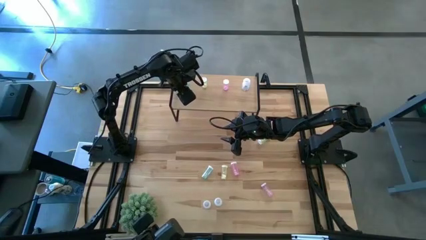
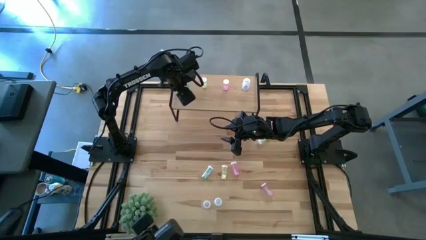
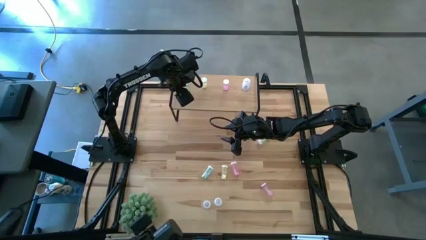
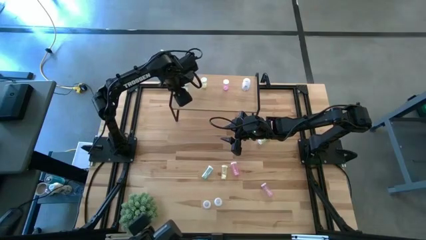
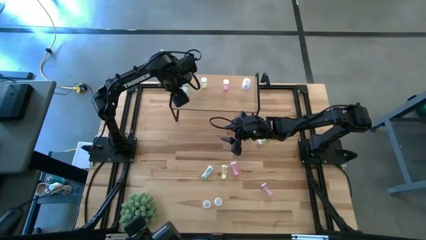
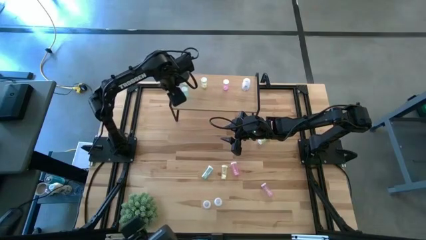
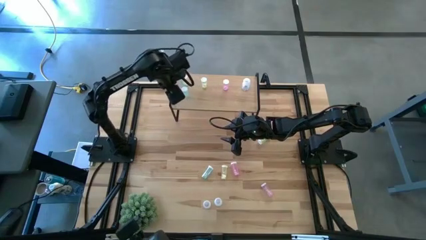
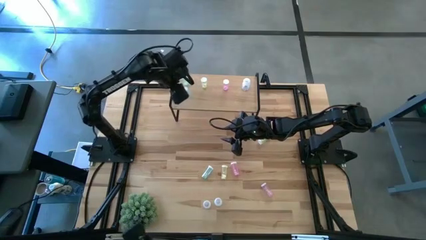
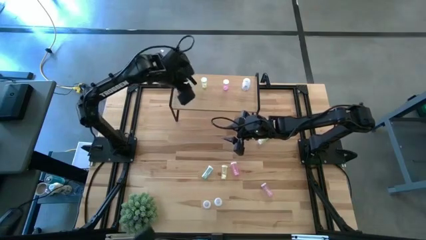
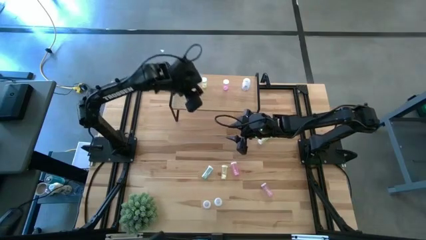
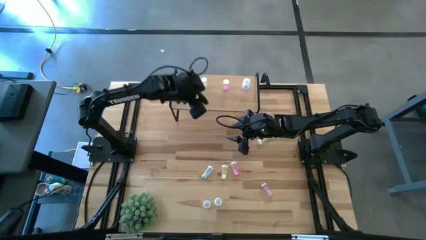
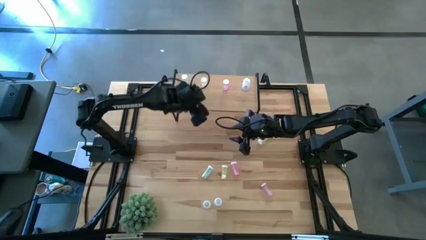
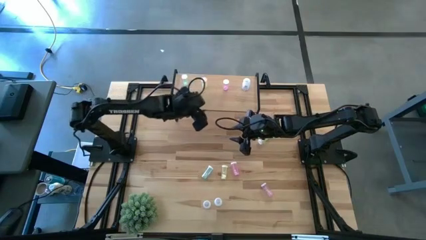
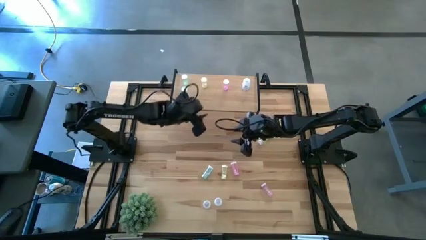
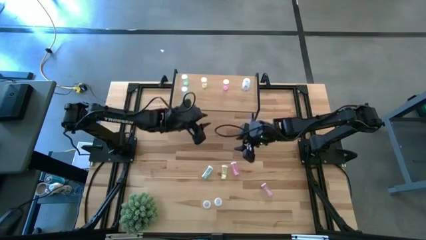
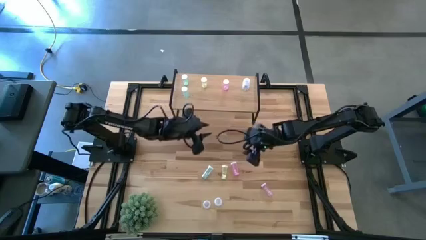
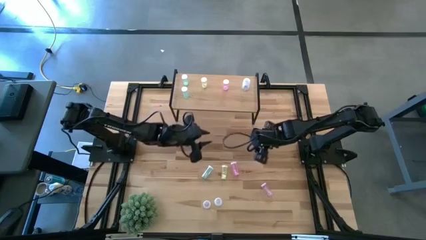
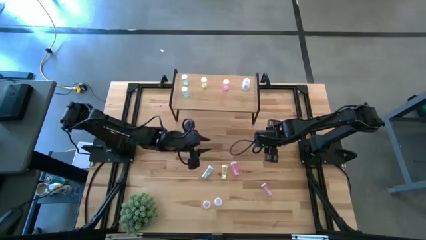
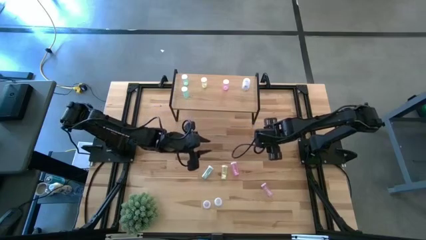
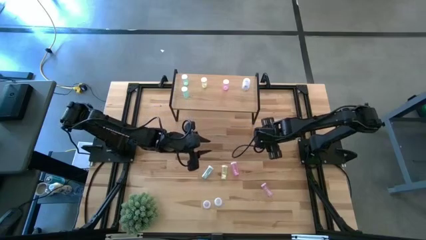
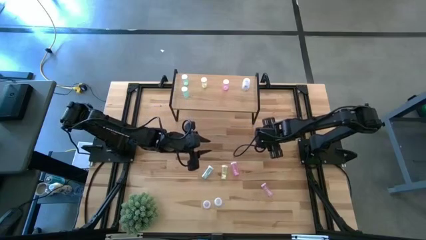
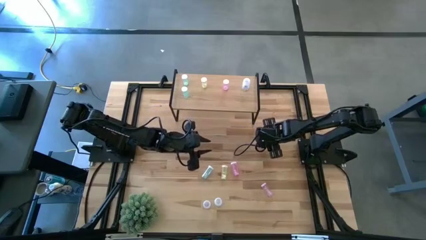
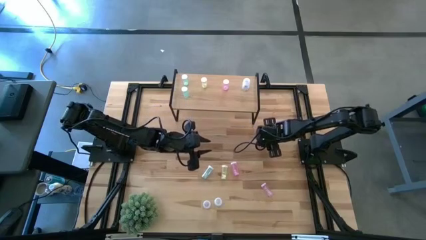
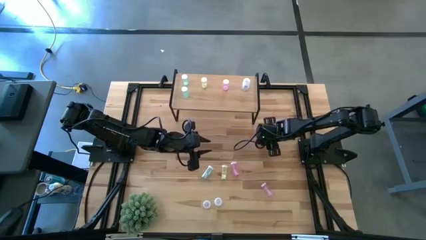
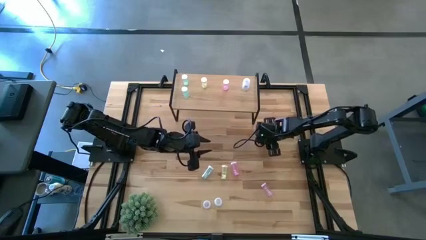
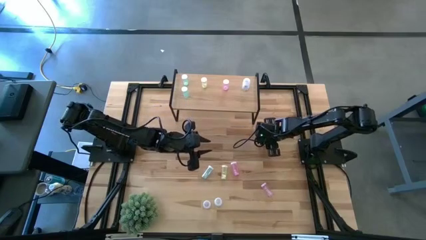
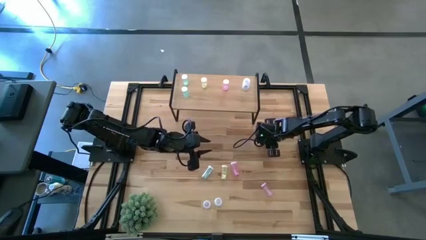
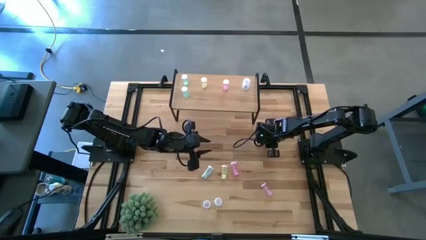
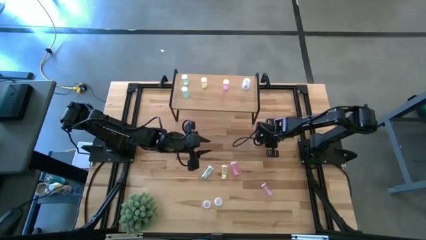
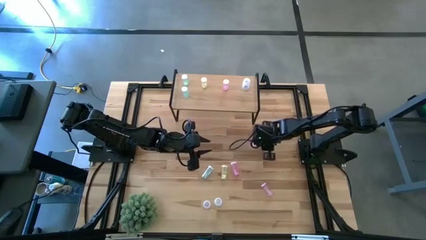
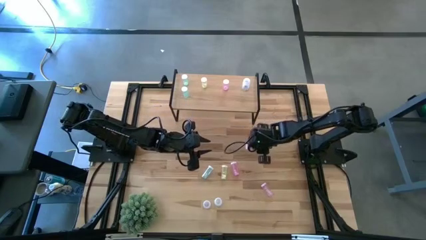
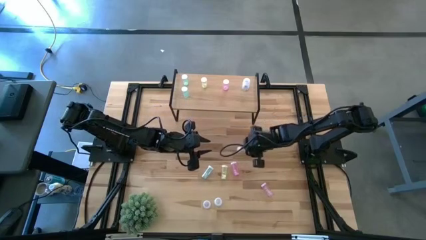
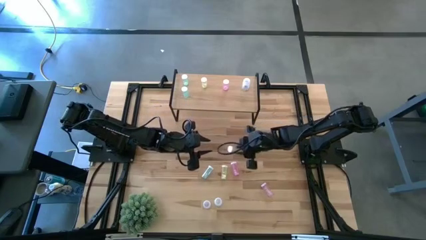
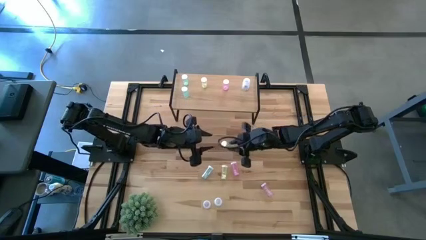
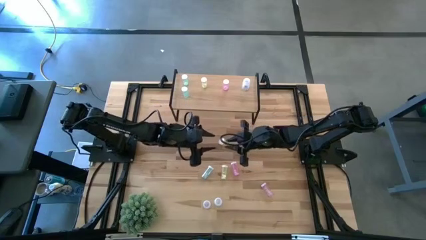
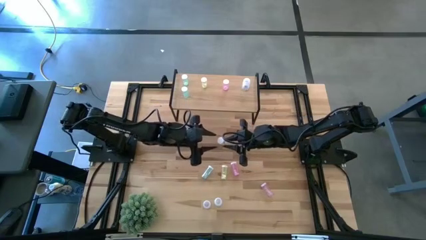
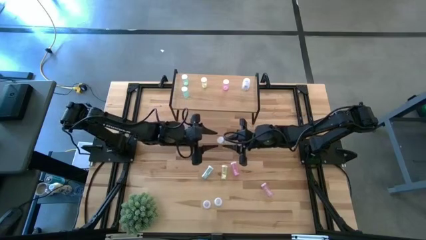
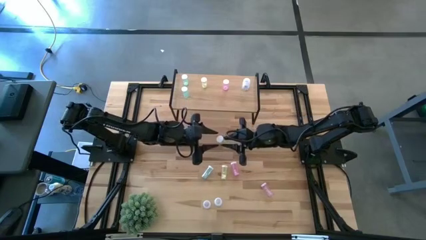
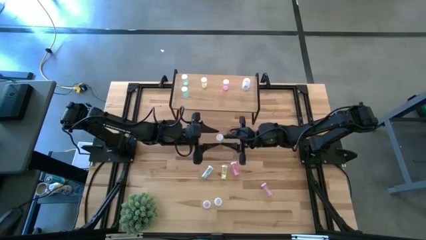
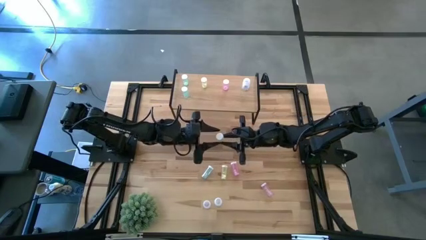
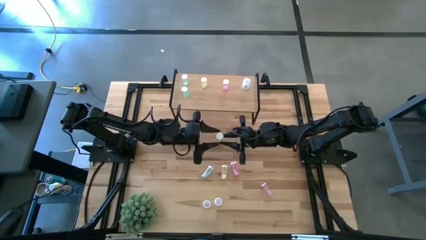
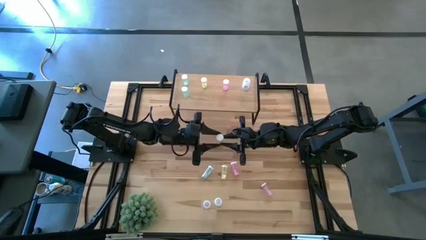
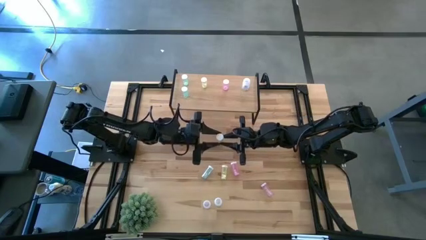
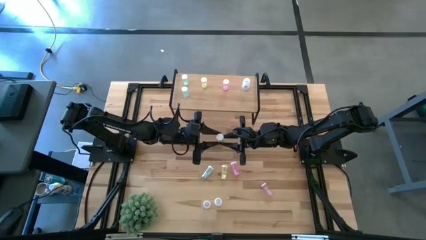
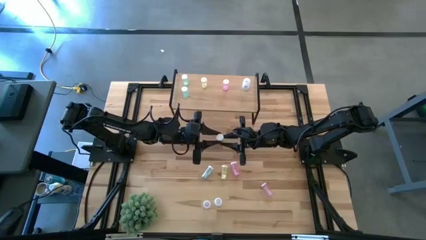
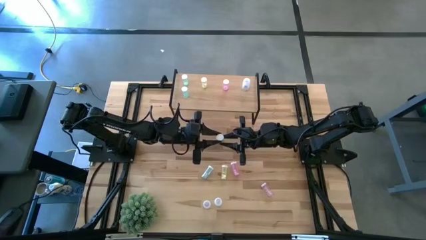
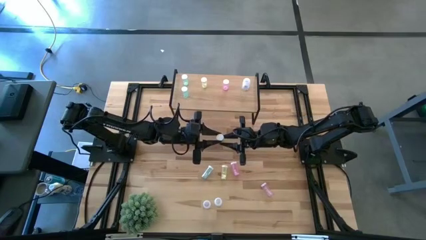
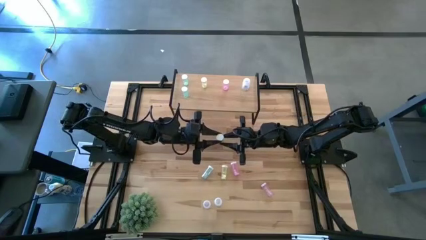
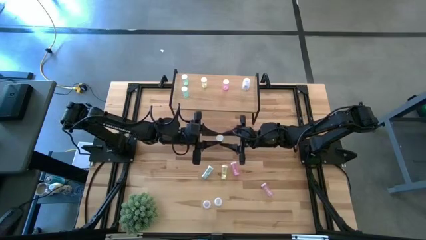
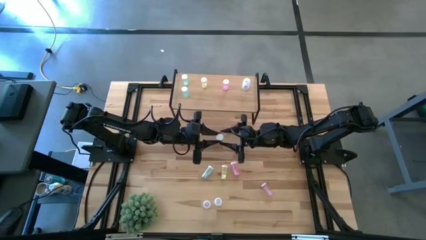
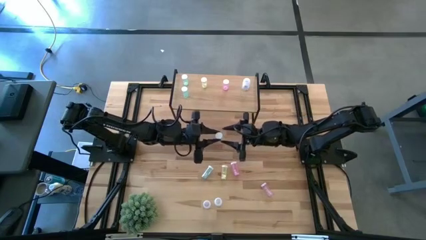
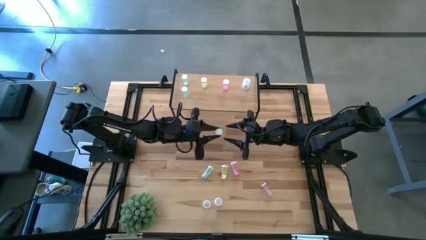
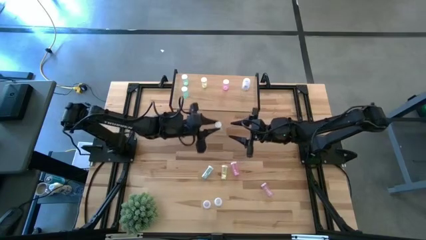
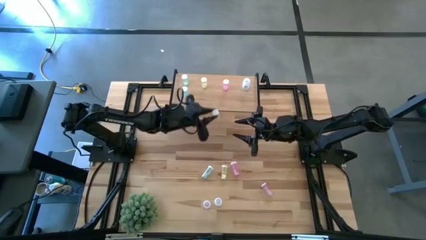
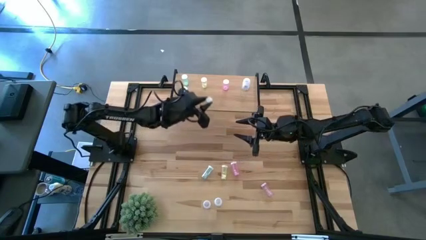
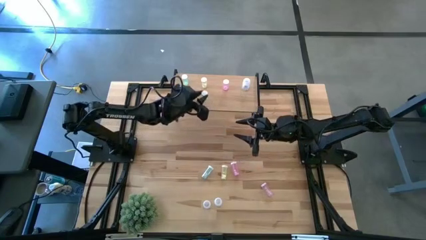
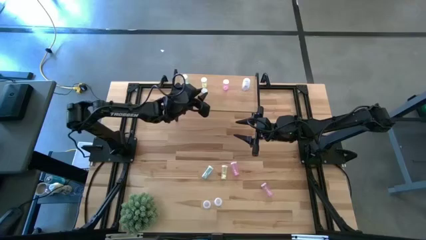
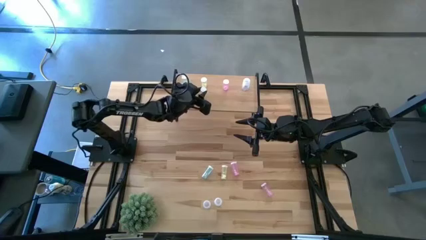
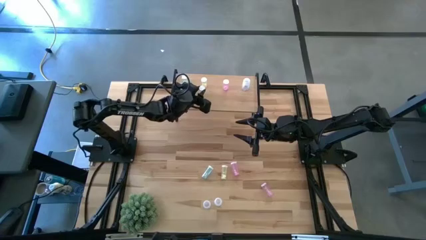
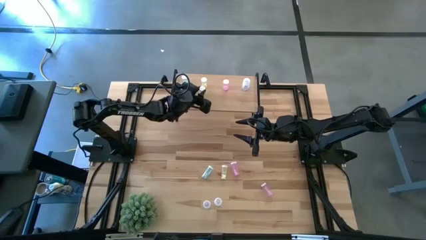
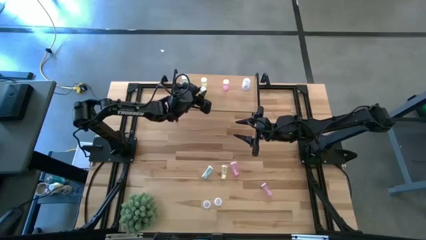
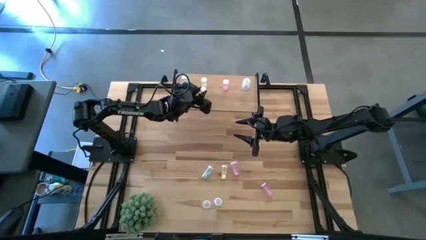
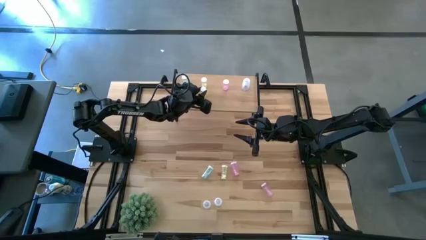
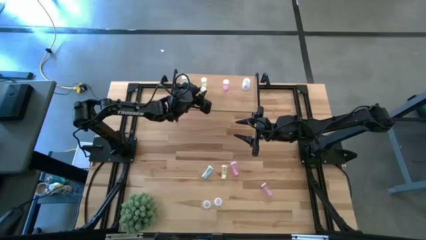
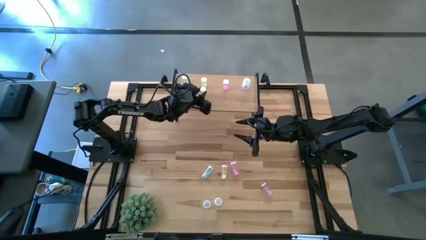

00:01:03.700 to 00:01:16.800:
Task: Pick and place medicine bottles onto shelf by color
Put the top yellow pill bottle on the shelf aligned with the other yellow pill bottle
